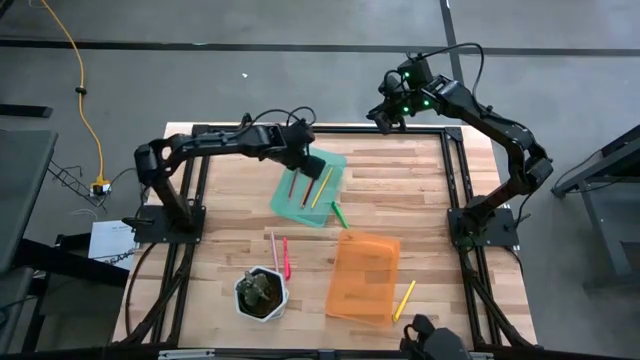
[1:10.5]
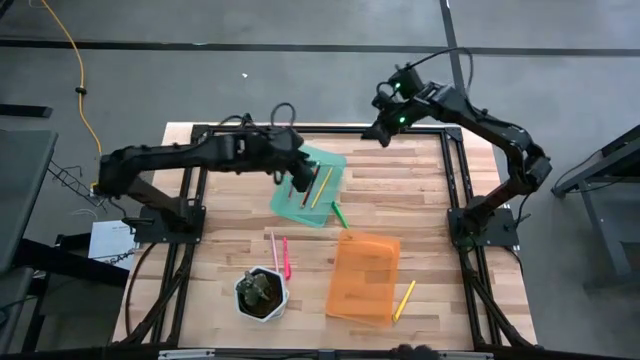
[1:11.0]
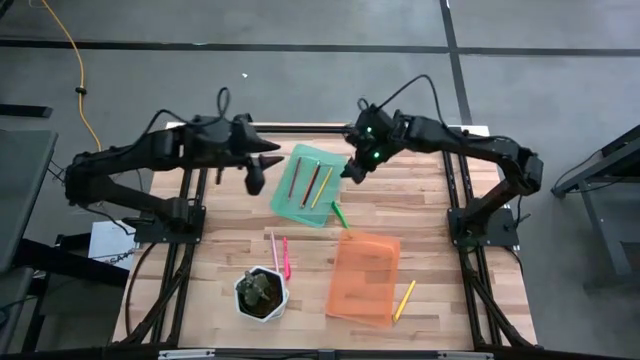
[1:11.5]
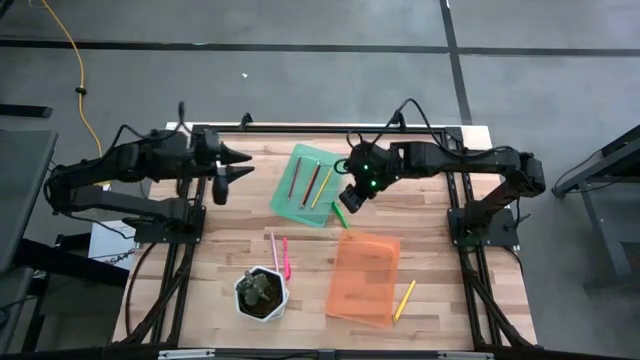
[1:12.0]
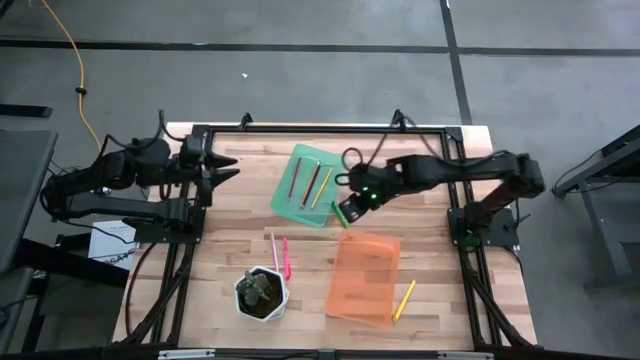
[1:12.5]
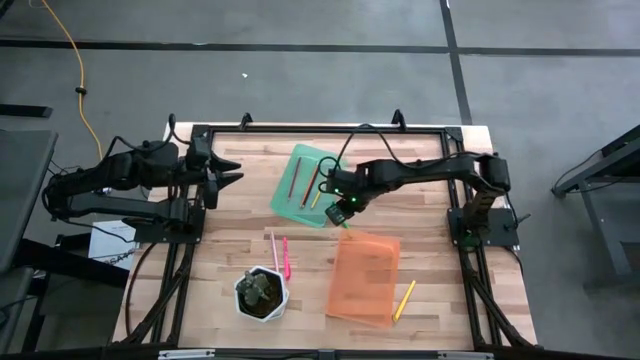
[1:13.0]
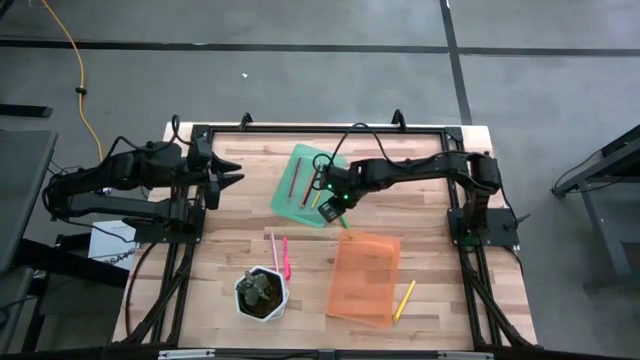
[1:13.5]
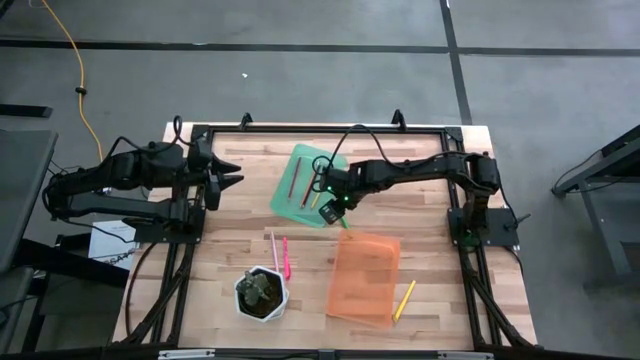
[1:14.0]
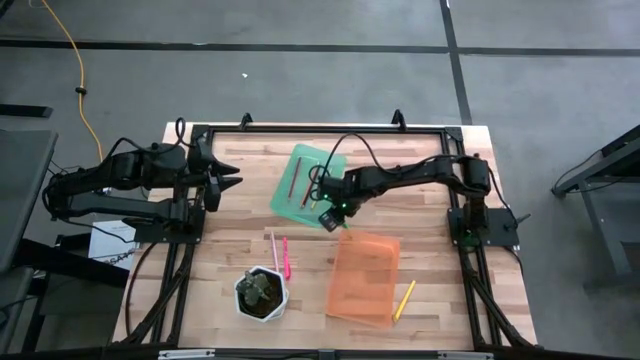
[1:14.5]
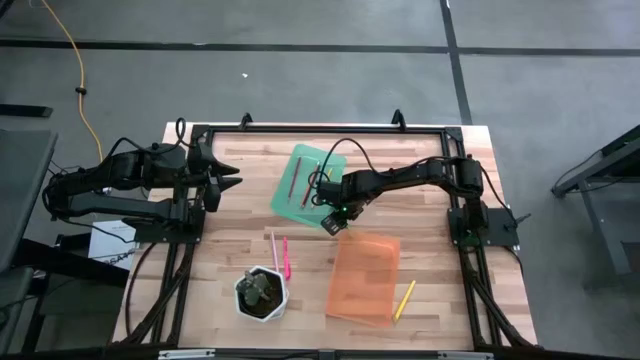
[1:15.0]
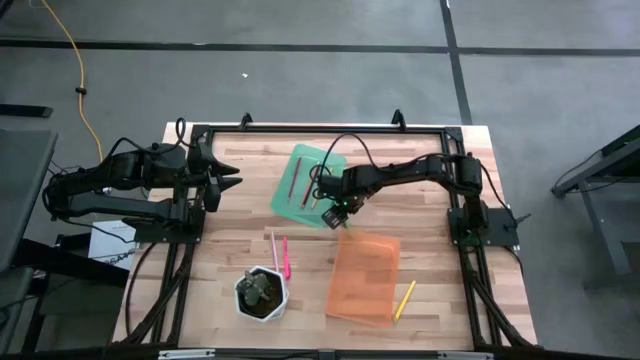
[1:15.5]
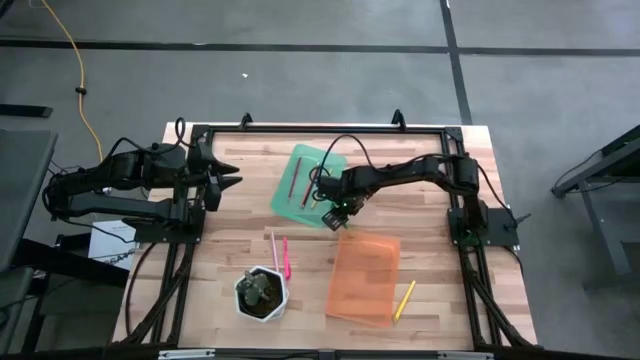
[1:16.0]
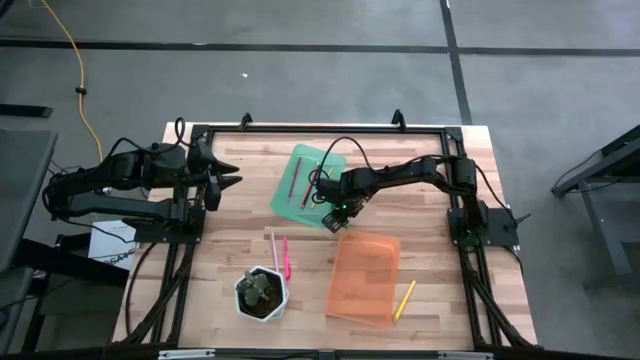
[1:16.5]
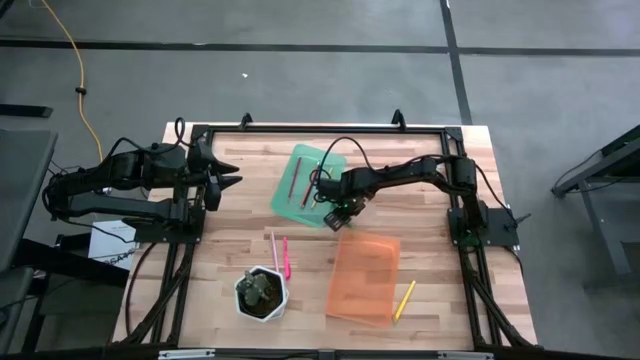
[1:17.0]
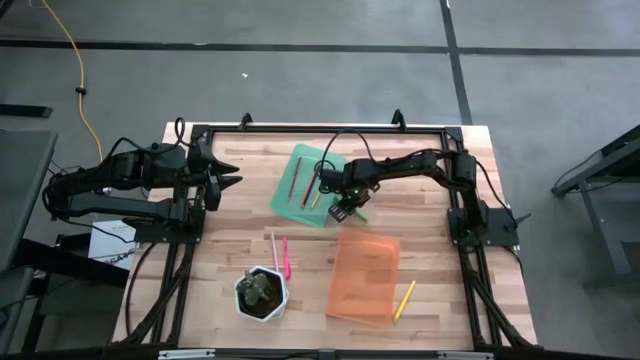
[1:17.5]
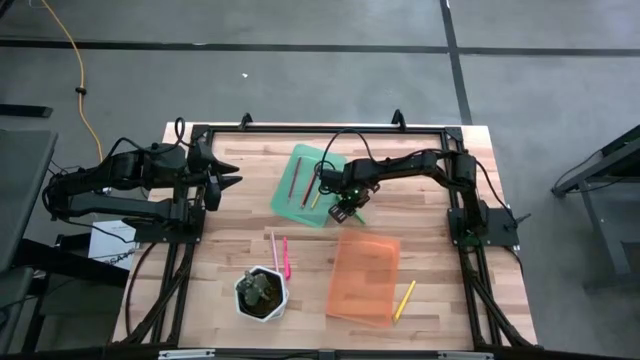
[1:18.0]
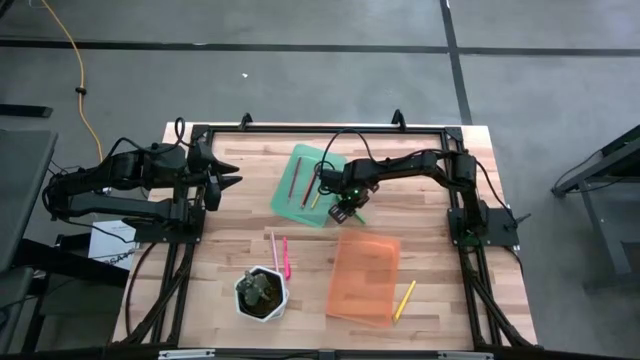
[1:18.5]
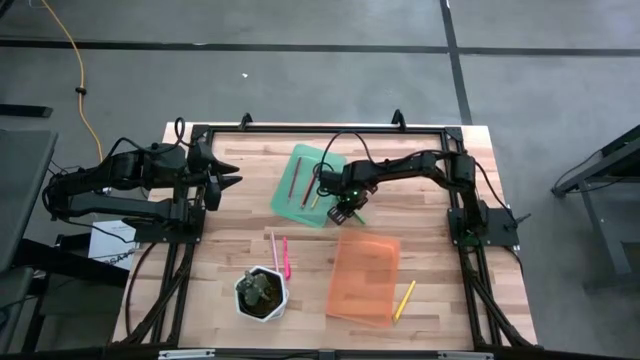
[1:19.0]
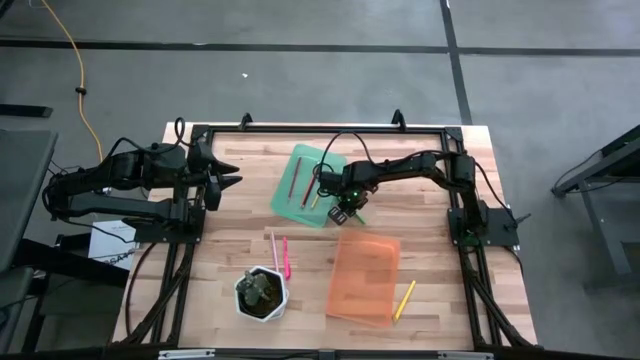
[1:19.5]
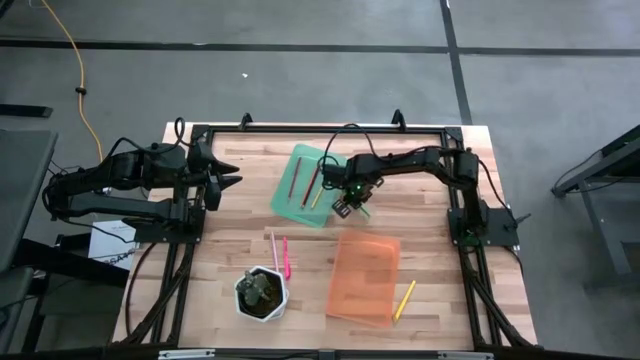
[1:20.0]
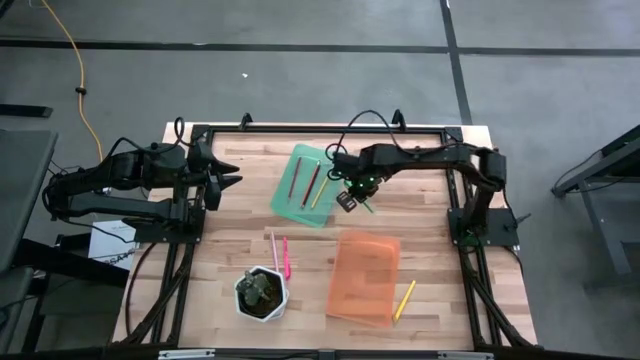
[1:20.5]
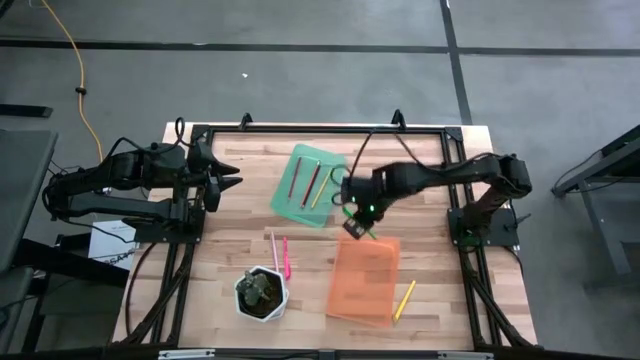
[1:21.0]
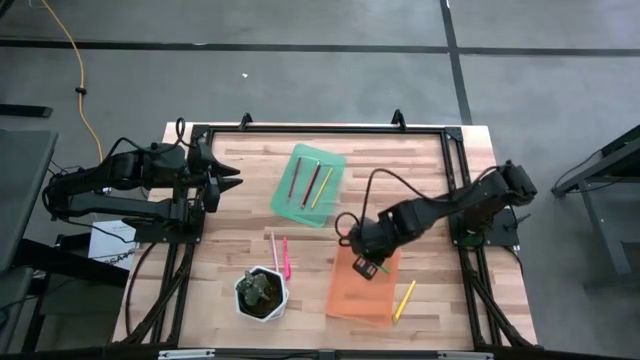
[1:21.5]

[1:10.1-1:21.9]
Task: Sort pens & pencils
Put the green pen into the orange bin

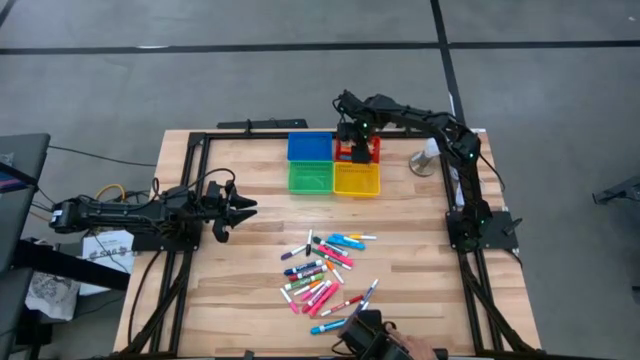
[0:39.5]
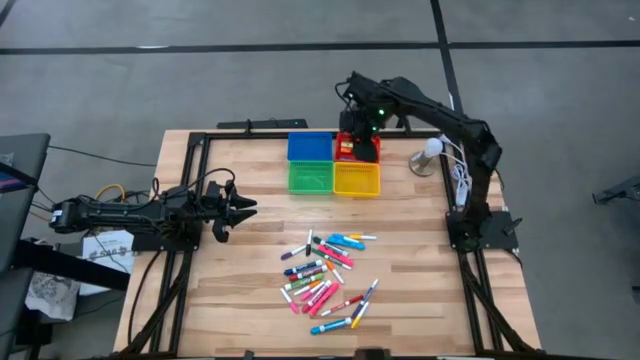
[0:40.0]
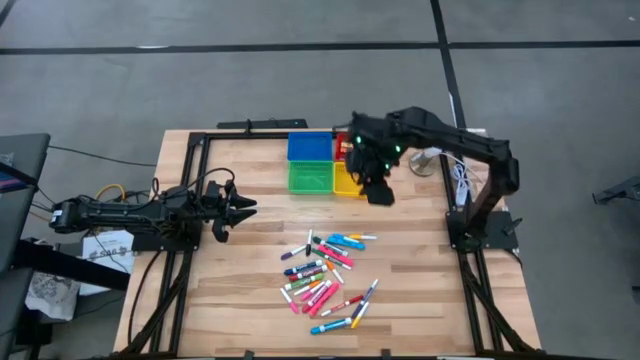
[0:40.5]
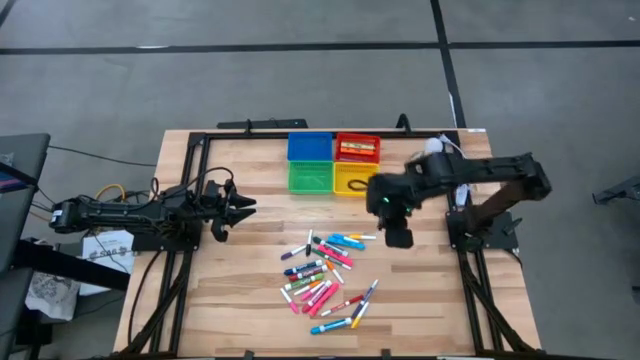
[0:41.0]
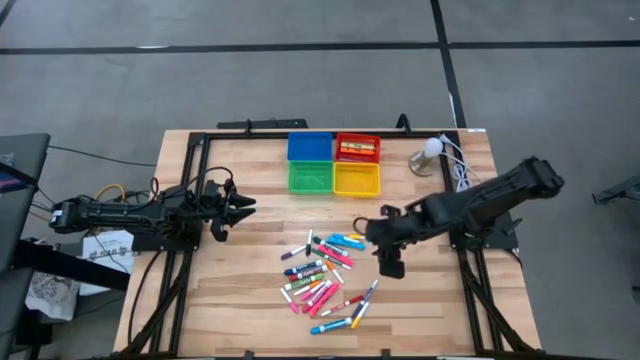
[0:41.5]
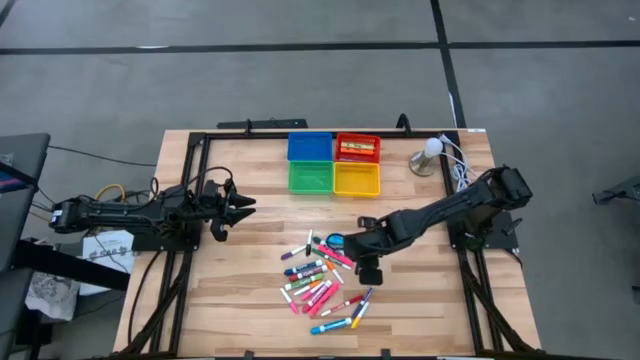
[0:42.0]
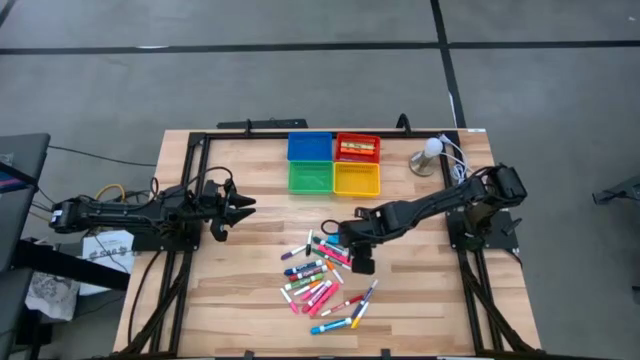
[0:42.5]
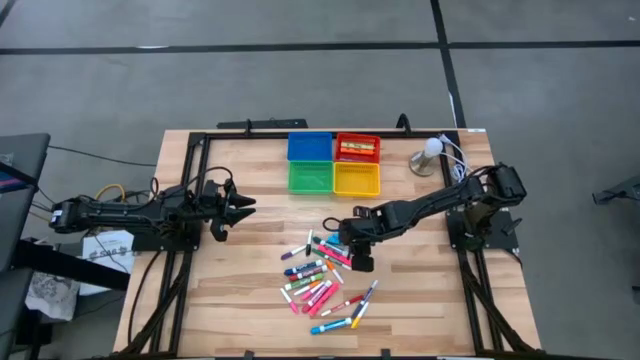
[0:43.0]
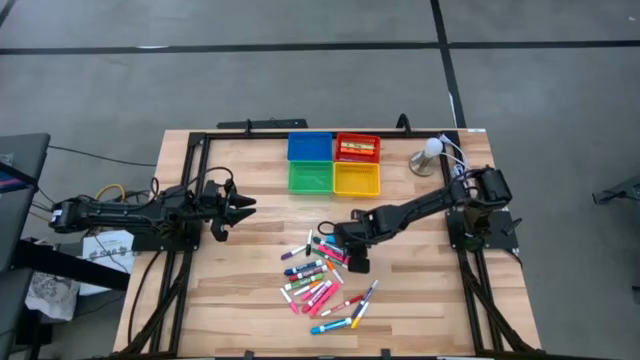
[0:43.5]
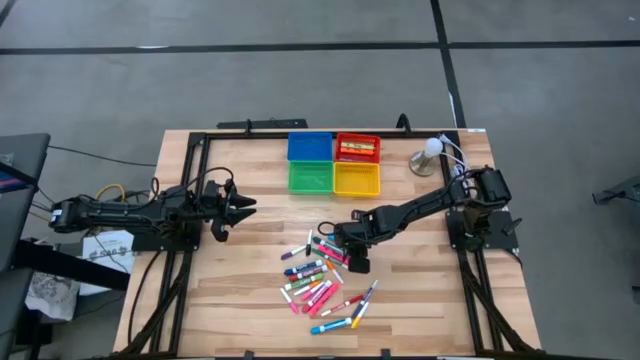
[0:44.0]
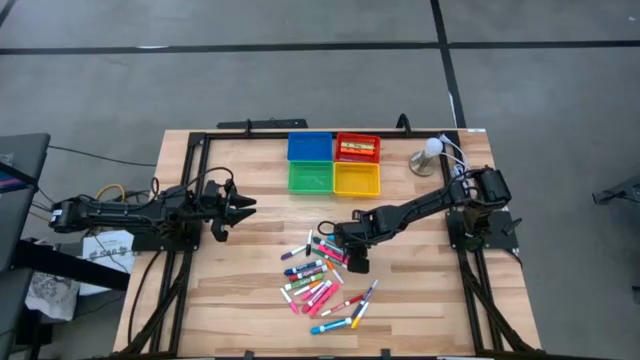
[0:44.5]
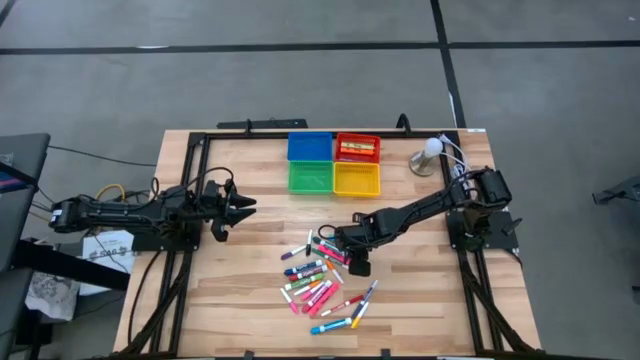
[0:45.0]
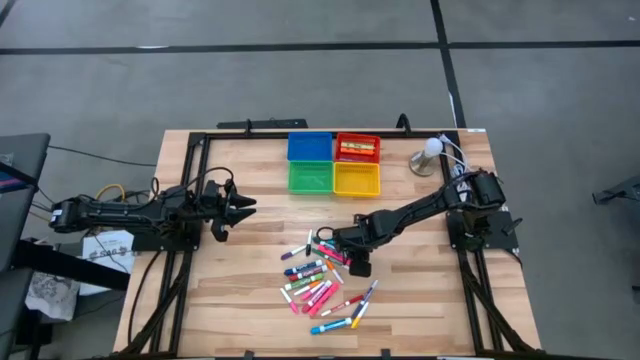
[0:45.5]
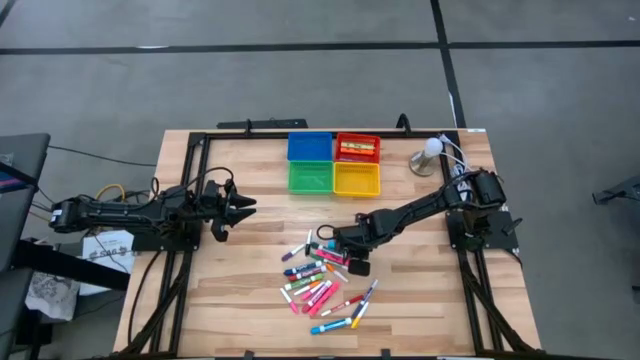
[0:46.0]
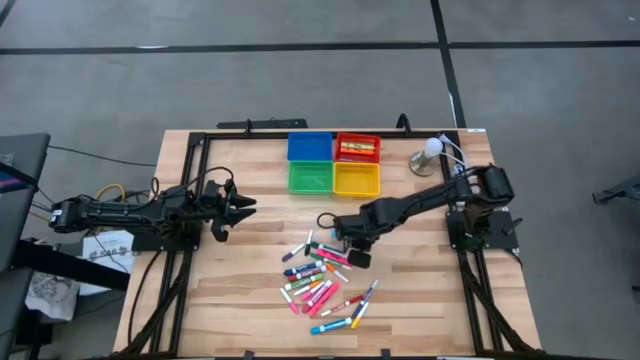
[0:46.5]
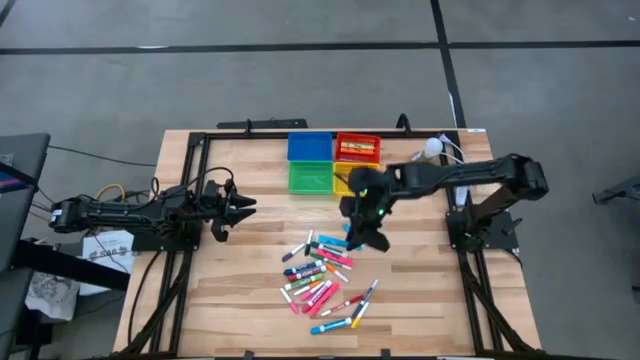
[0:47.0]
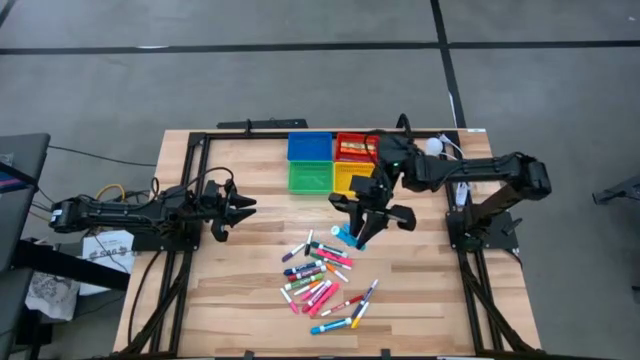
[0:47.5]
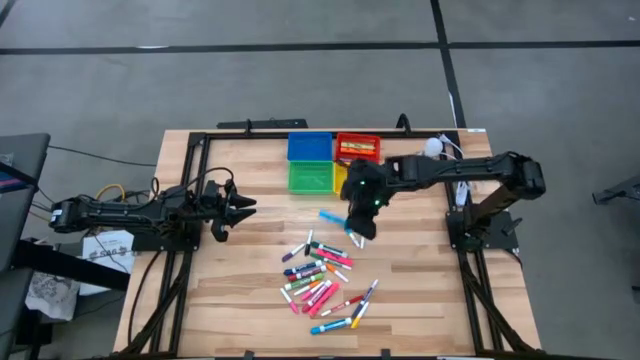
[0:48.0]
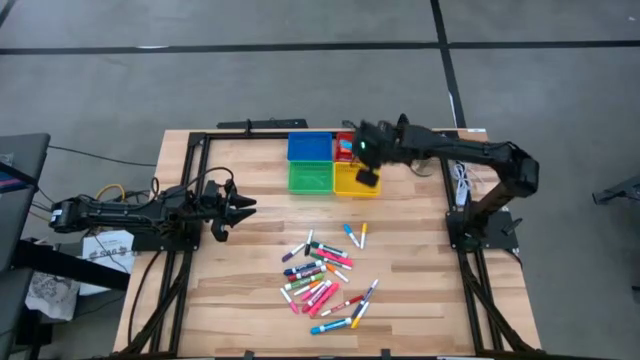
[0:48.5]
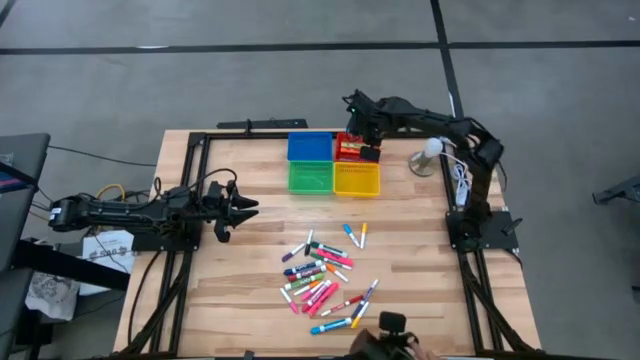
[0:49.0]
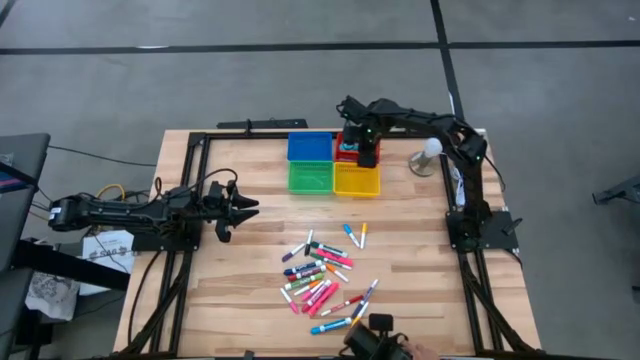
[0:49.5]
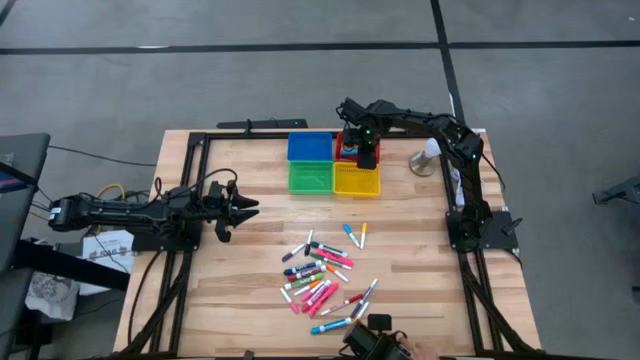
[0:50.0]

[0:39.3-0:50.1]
Task: Pick & Place Markers
Put the light blue marker in the red bin
